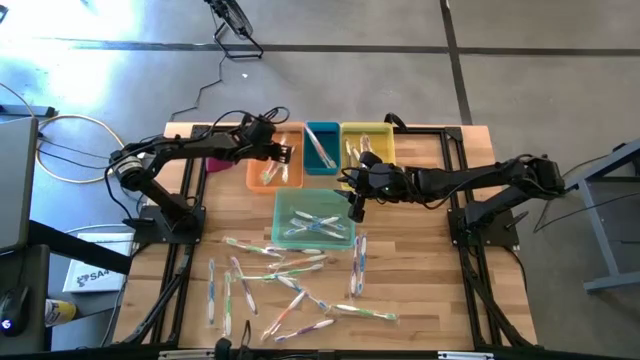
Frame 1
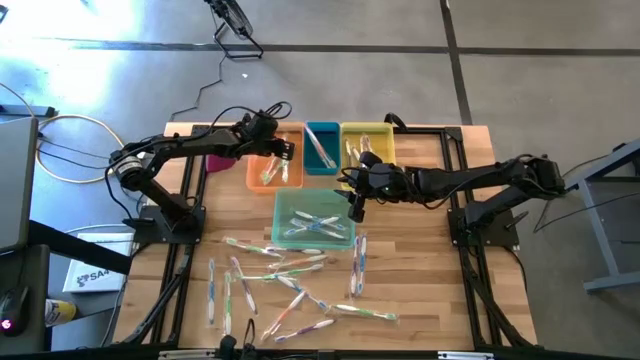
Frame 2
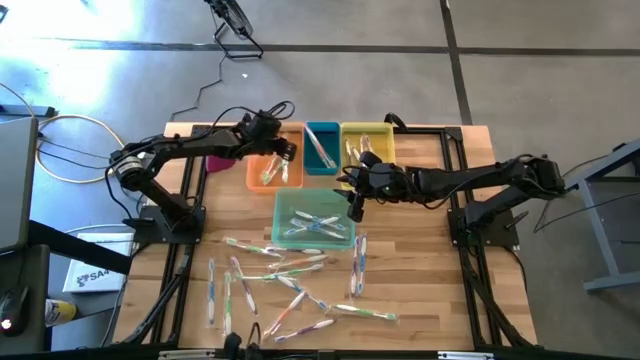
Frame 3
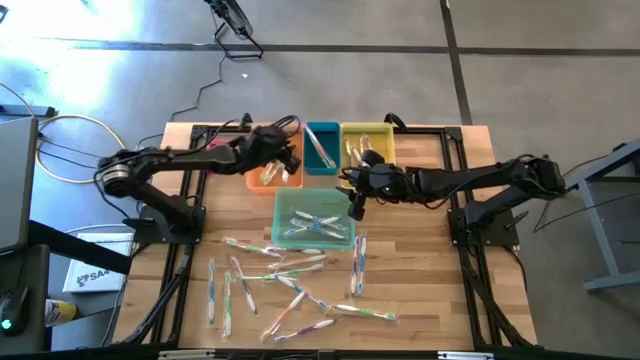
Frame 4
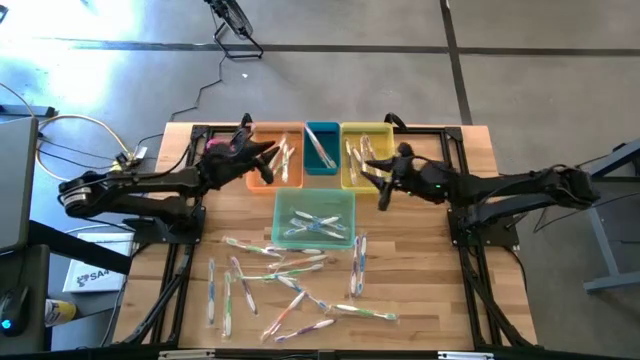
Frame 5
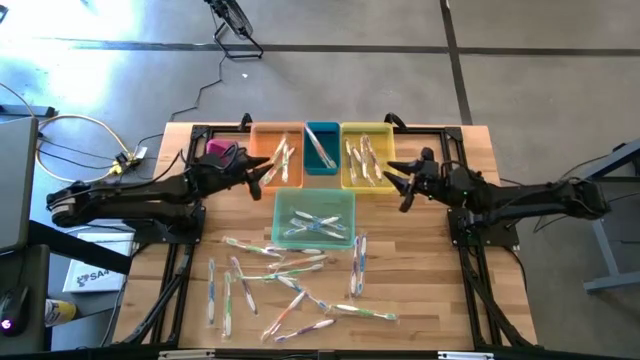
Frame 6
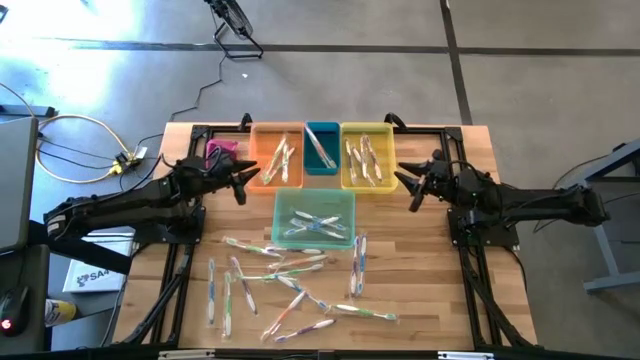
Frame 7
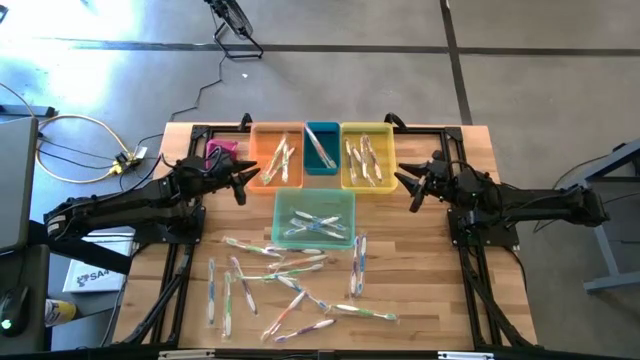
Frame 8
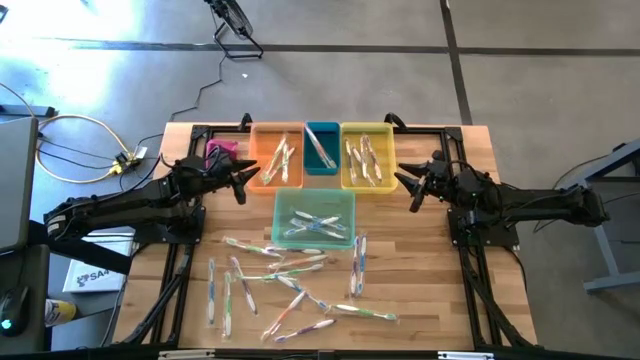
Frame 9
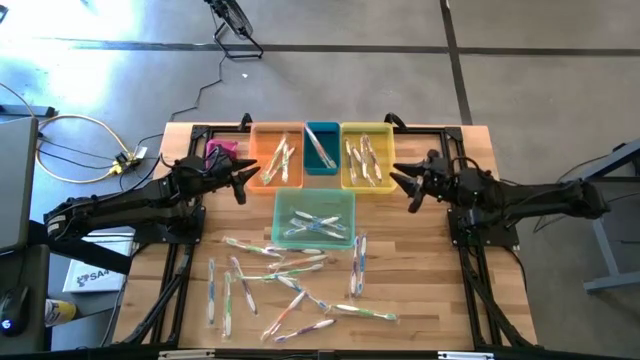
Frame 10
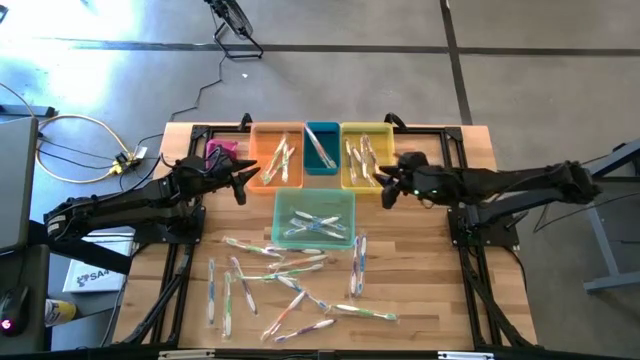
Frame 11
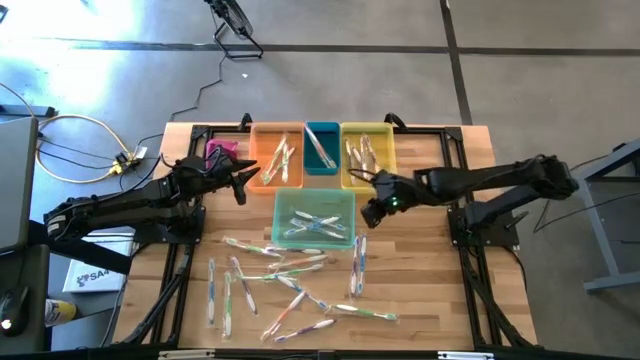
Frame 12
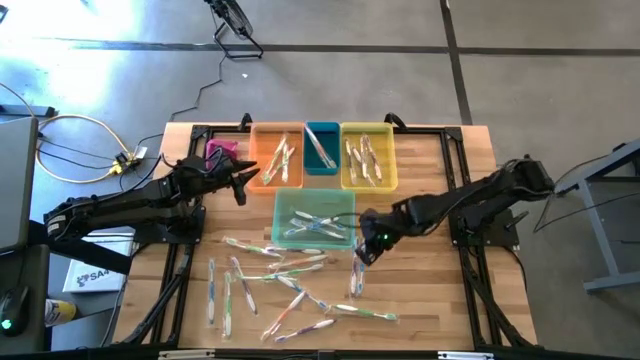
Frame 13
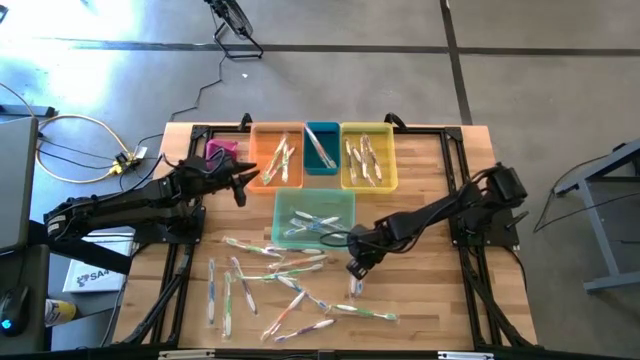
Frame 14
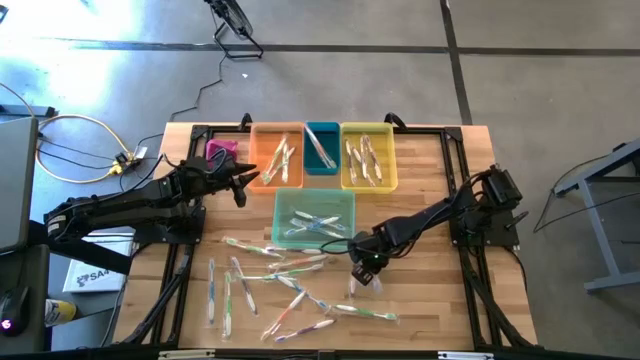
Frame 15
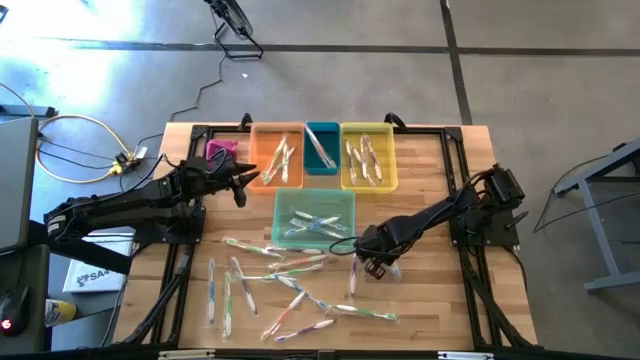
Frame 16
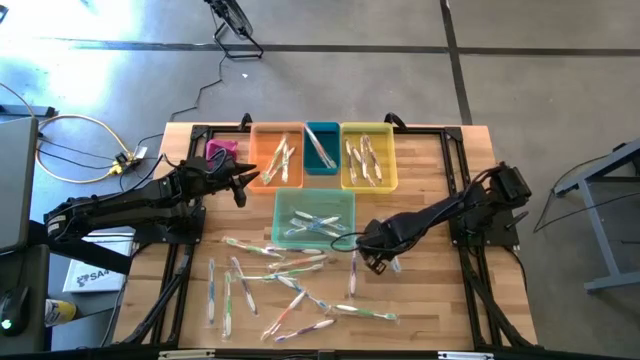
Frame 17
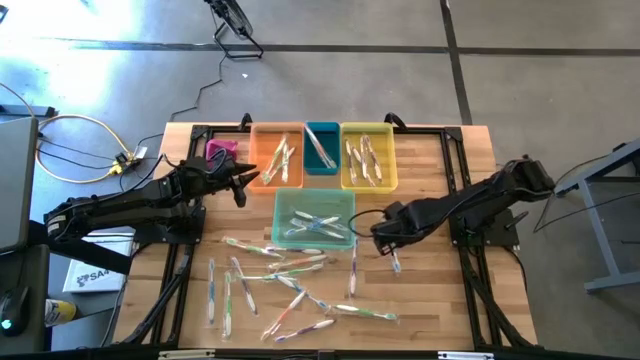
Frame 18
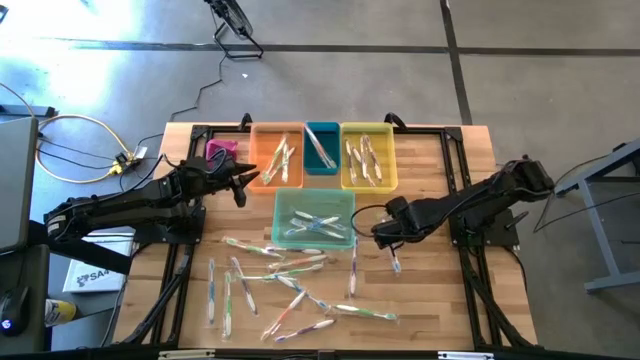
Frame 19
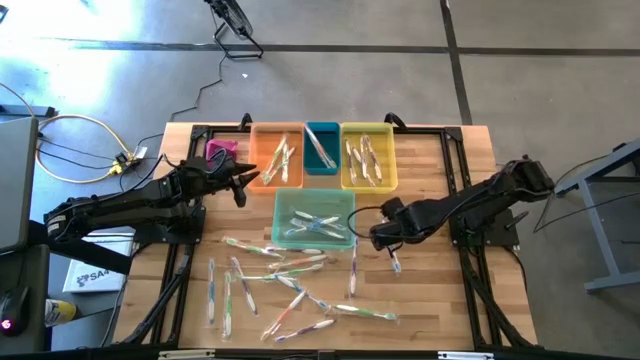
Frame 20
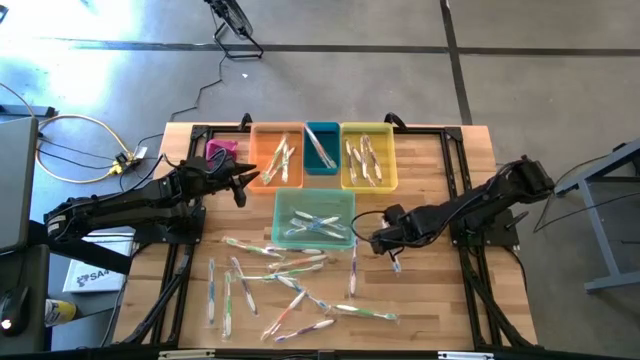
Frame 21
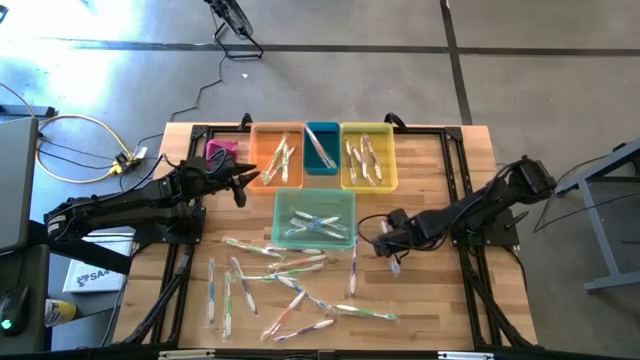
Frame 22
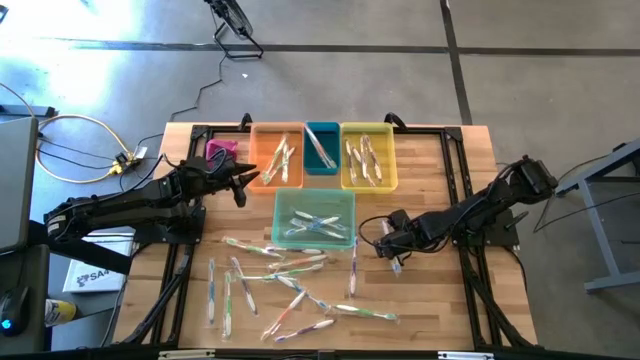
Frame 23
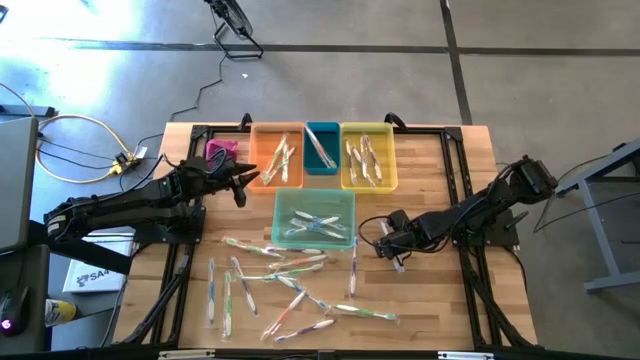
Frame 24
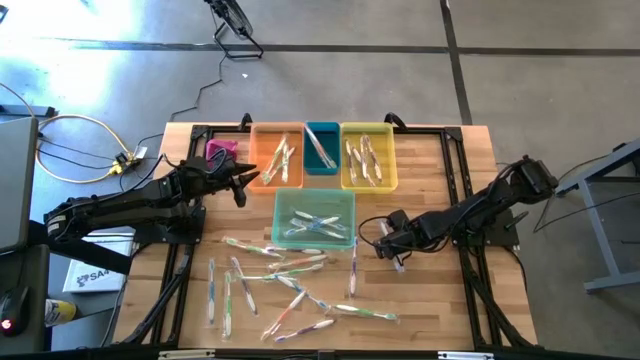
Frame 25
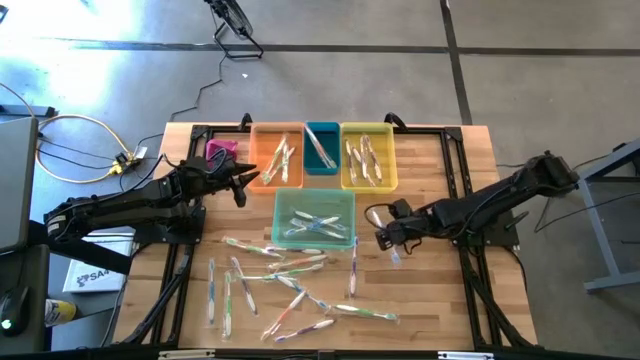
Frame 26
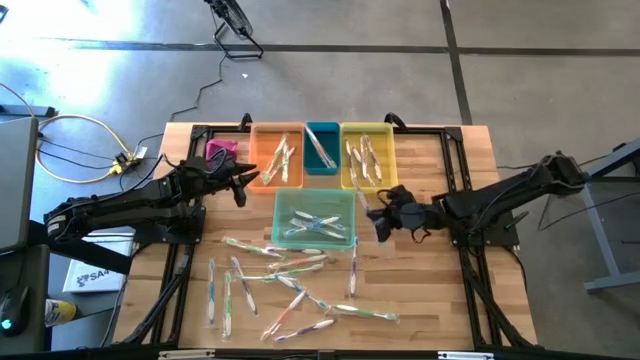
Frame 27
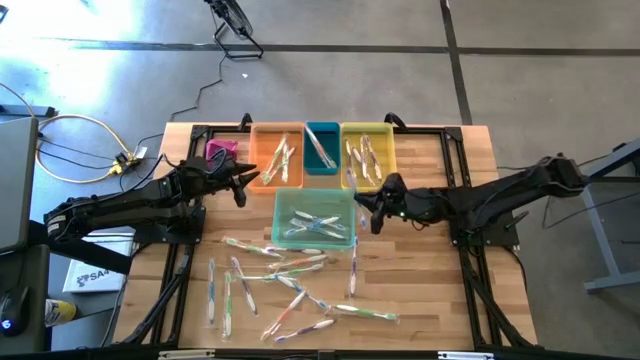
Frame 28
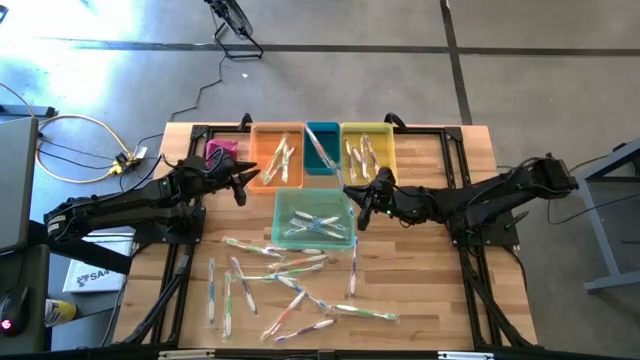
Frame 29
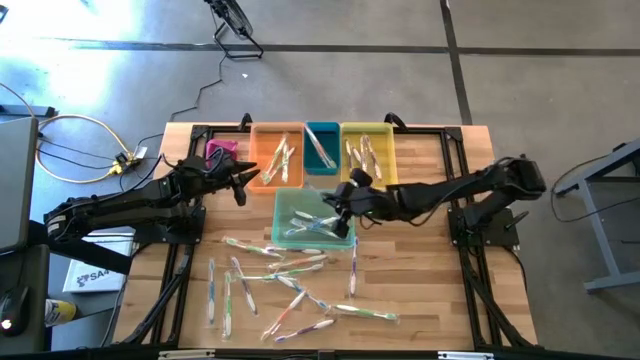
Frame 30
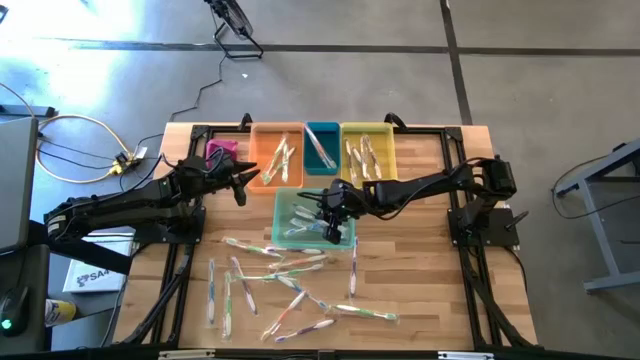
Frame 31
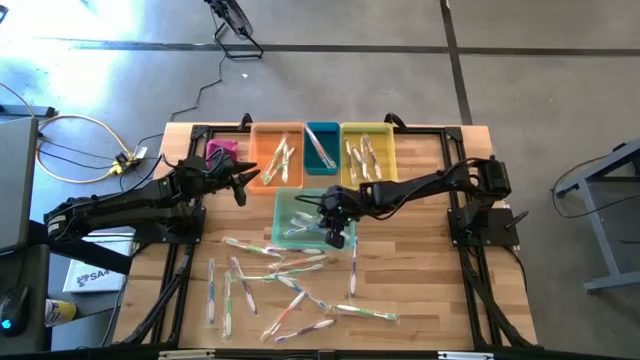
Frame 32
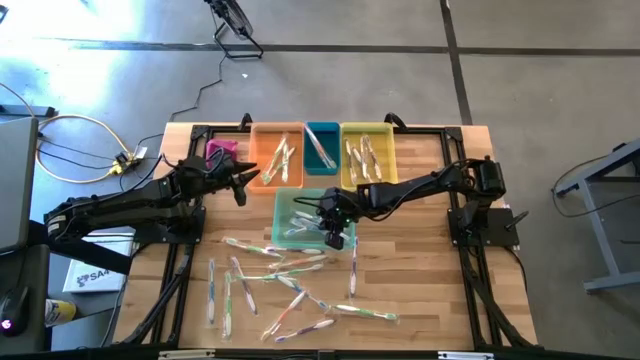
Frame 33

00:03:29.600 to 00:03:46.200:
Task: Pick & Place Toothbrushes
Put the blue toothbrush into the green bin
